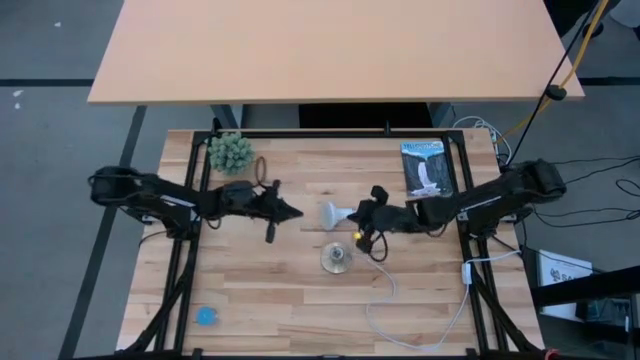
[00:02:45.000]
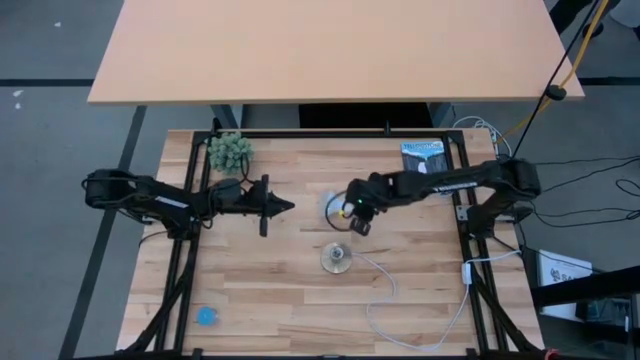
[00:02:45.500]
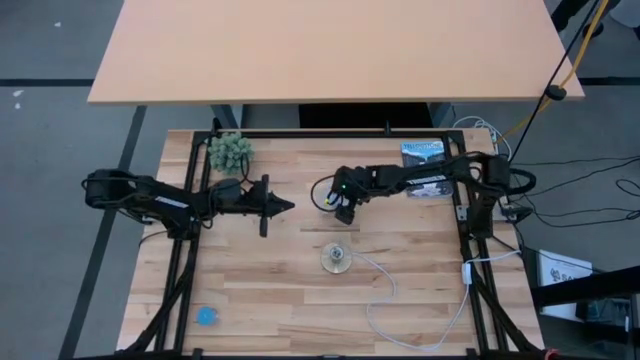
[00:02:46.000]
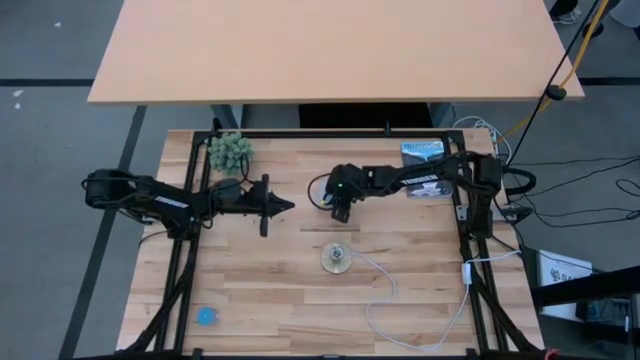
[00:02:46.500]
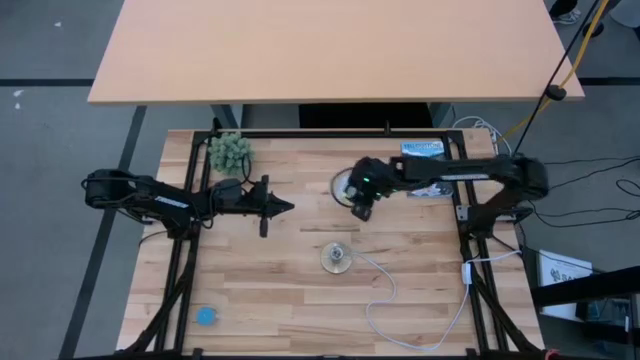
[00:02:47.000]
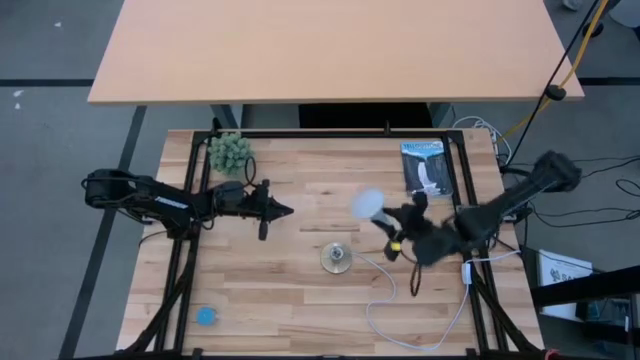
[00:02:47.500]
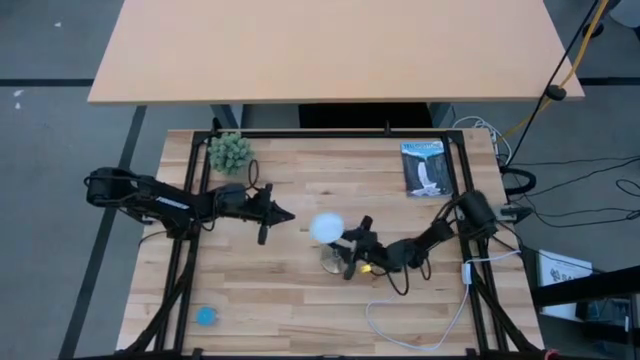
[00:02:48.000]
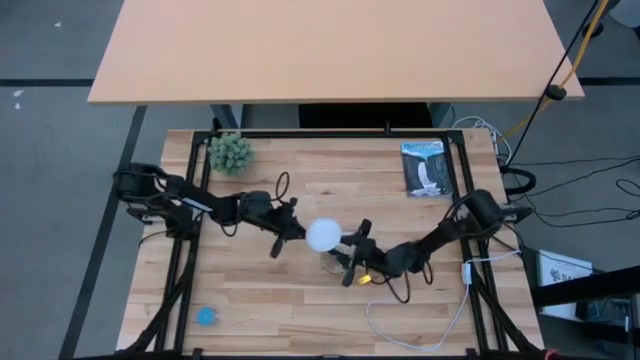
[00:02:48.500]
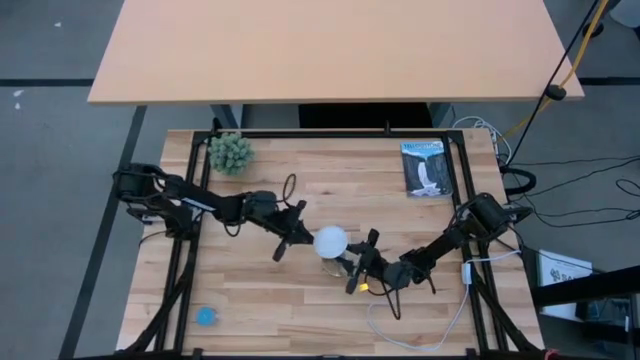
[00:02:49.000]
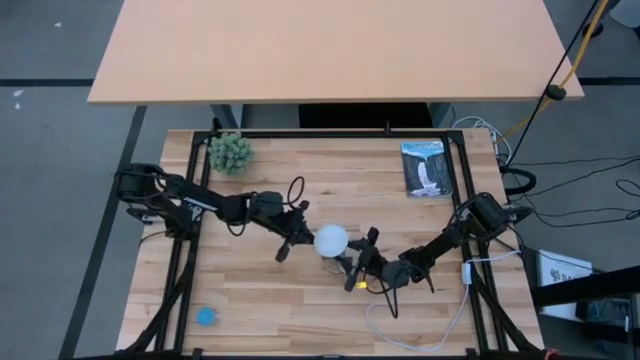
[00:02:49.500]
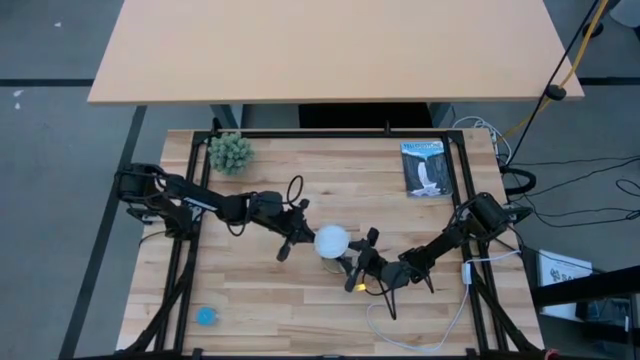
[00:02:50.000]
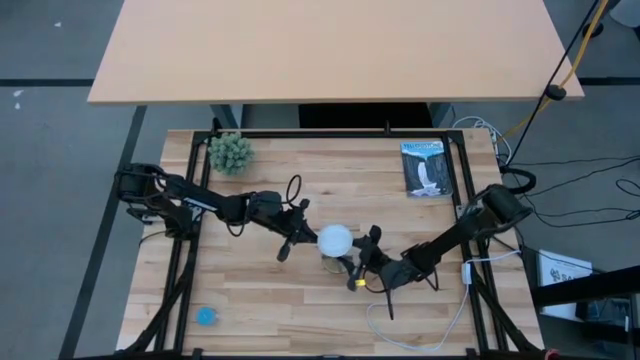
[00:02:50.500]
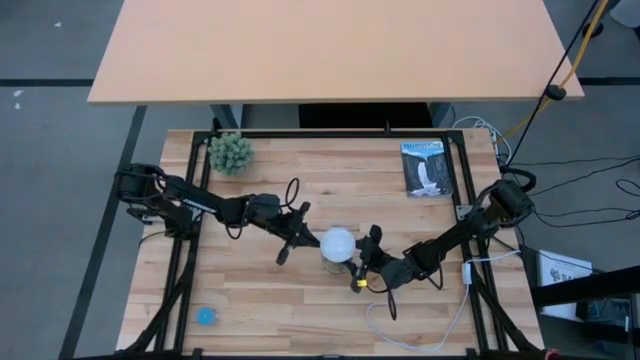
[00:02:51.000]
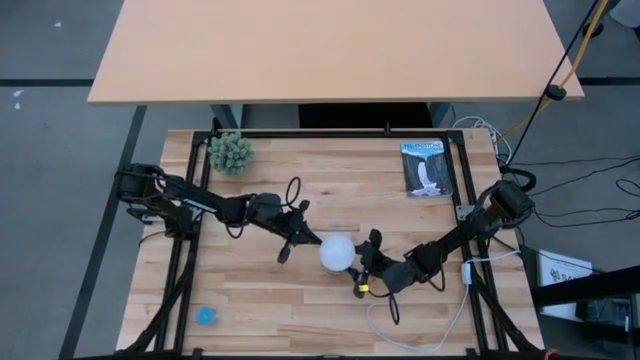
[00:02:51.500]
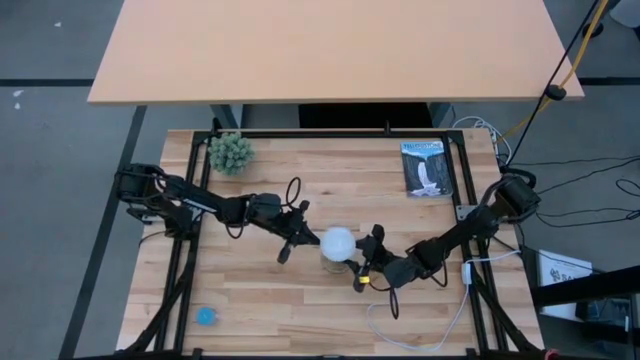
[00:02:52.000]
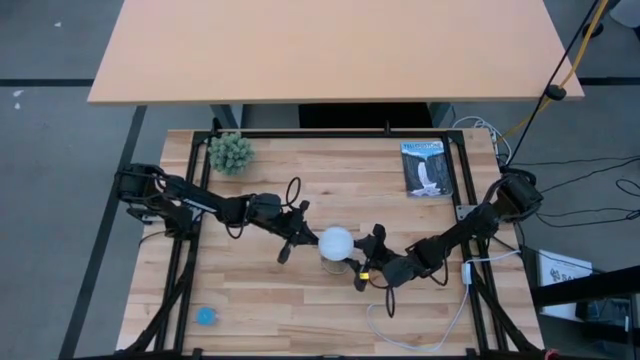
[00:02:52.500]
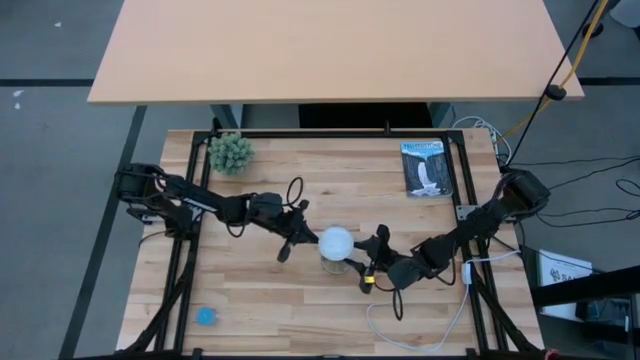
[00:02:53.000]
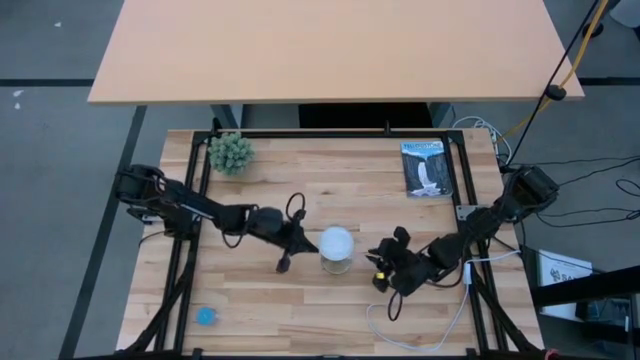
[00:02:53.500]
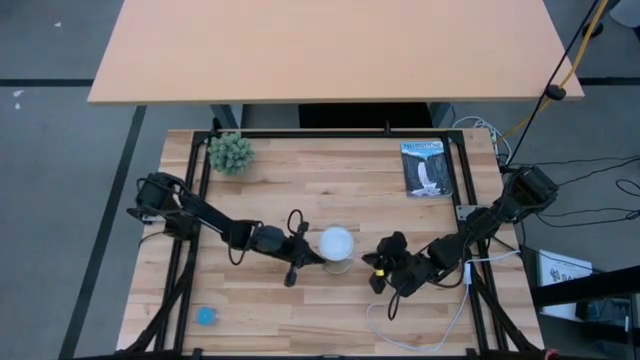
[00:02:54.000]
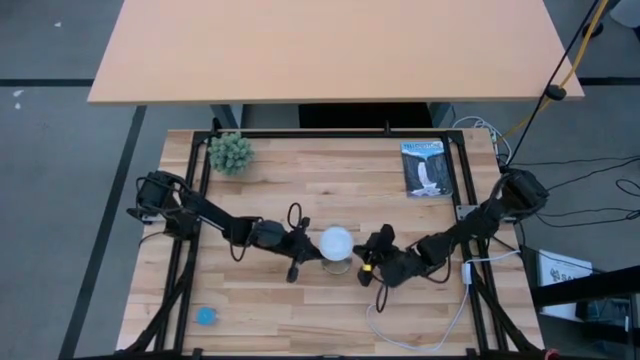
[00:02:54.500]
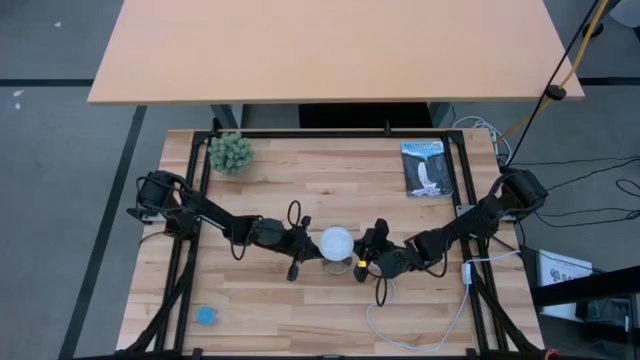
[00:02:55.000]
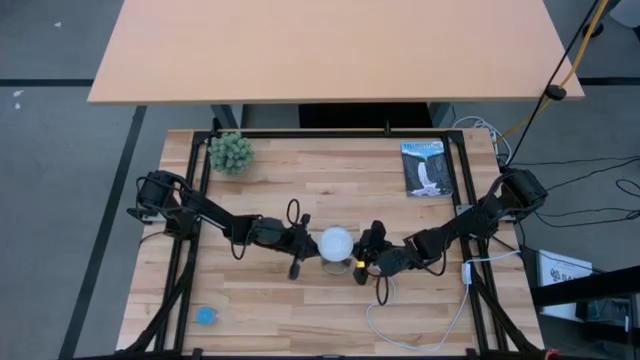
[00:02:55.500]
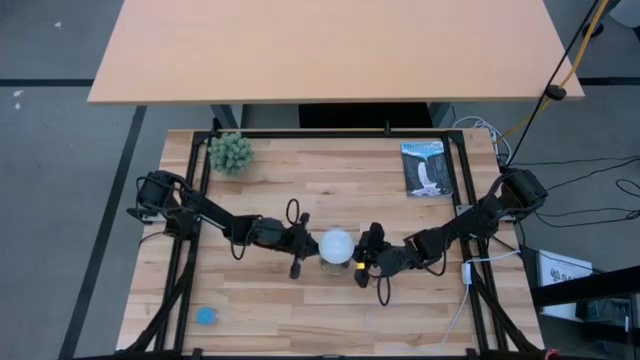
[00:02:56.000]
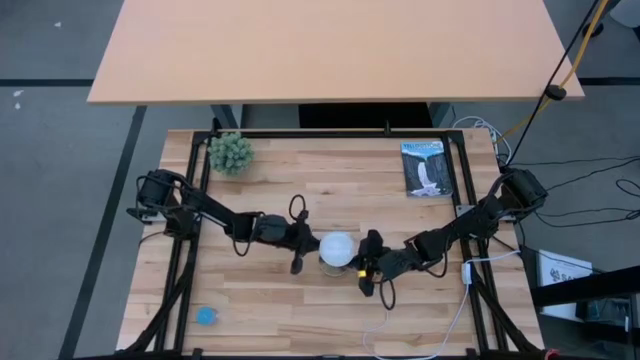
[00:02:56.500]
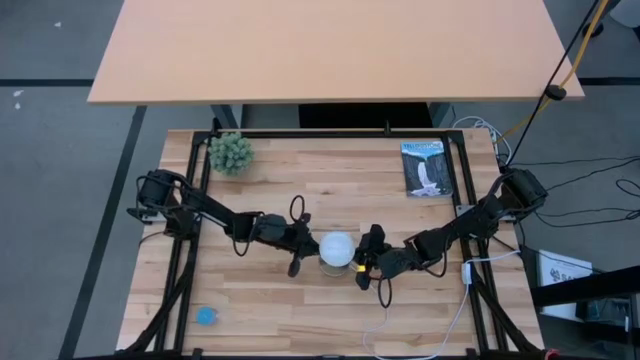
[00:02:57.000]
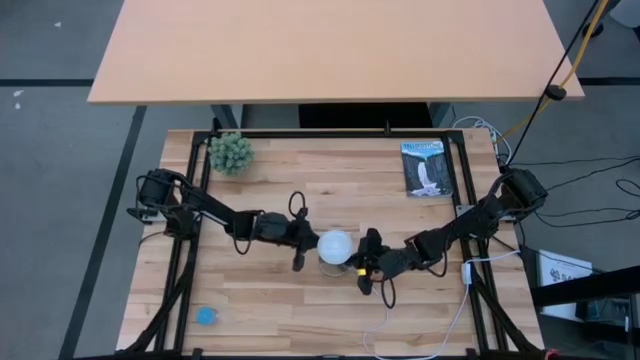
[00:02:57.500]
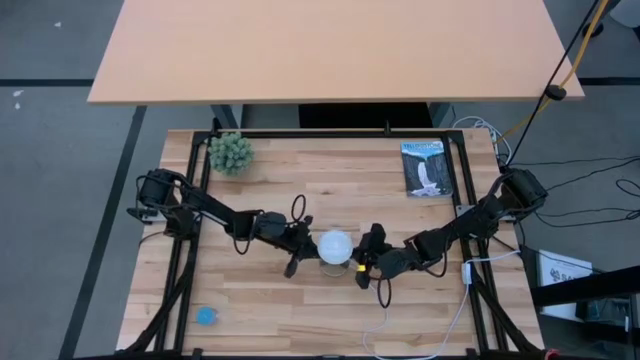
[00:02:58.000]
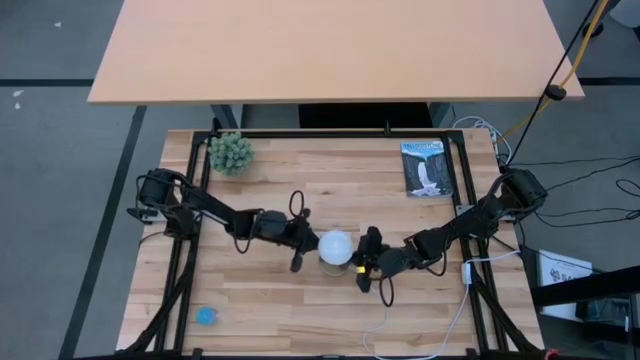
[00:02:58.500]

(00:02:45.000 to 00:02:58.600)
Task: Screw lightbulb
Insert the white light bulb into the gold lamp

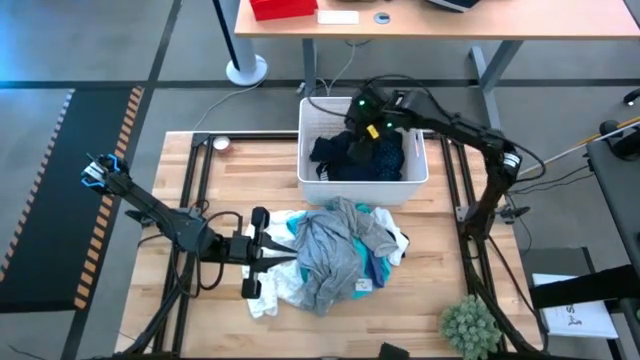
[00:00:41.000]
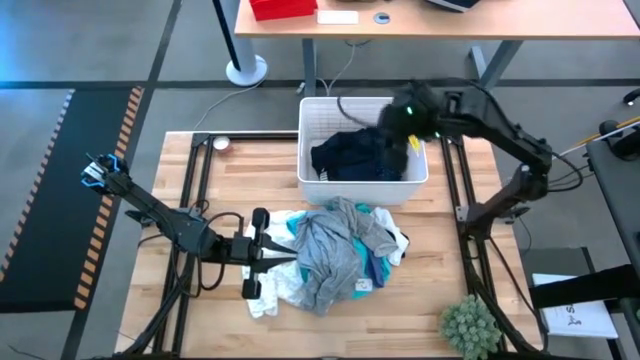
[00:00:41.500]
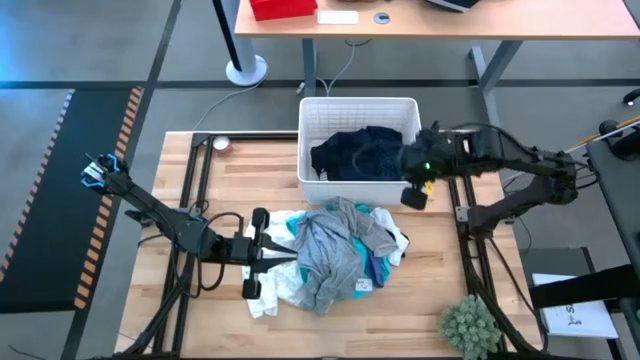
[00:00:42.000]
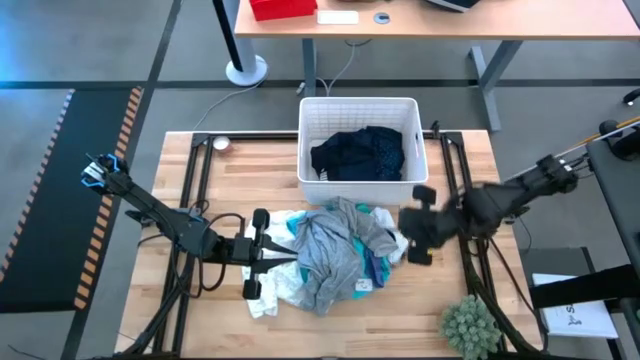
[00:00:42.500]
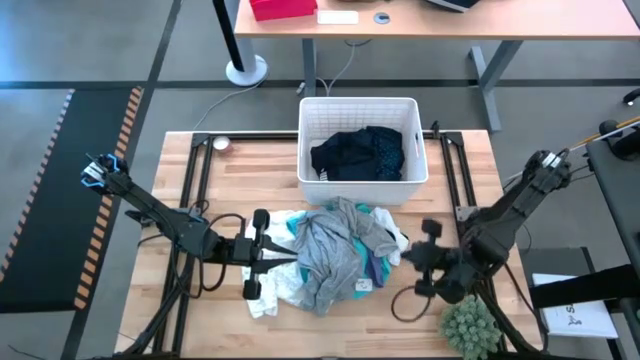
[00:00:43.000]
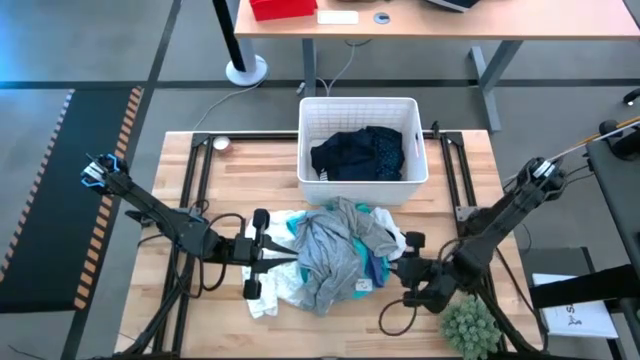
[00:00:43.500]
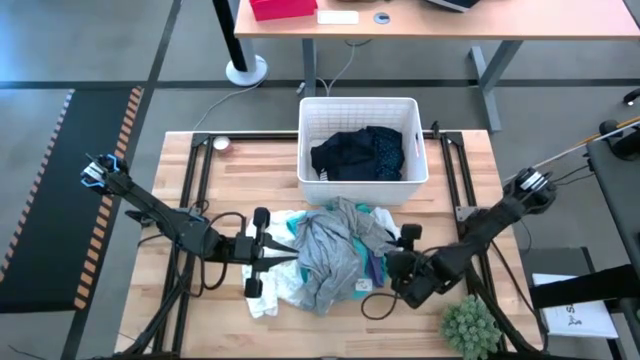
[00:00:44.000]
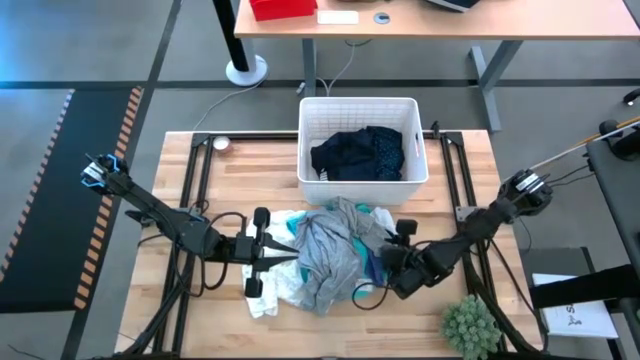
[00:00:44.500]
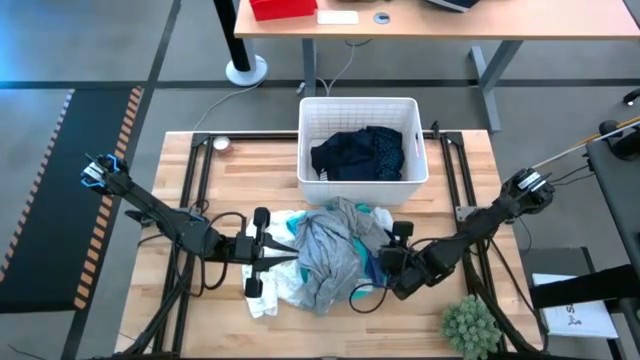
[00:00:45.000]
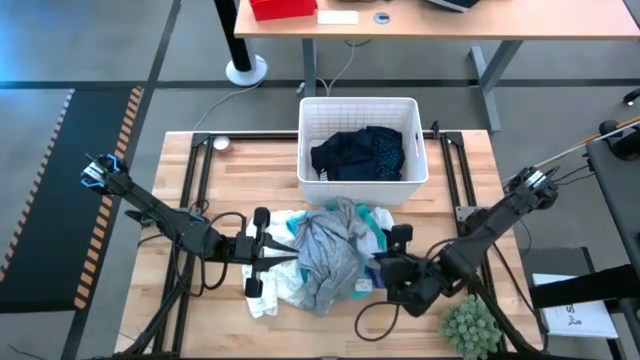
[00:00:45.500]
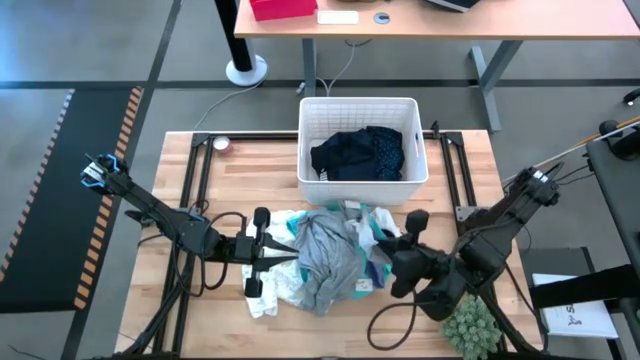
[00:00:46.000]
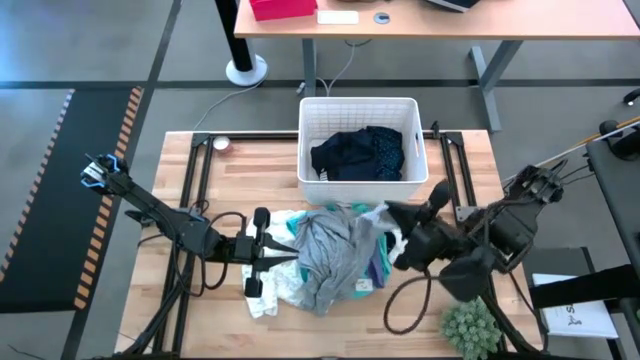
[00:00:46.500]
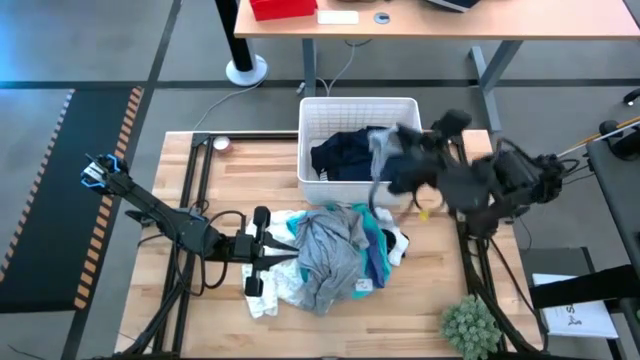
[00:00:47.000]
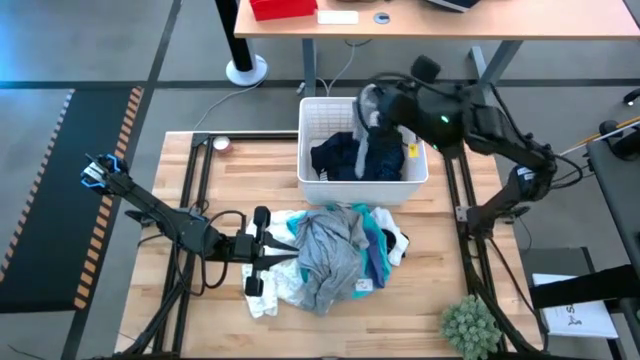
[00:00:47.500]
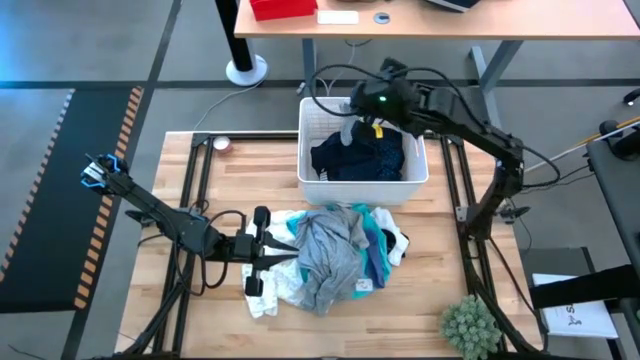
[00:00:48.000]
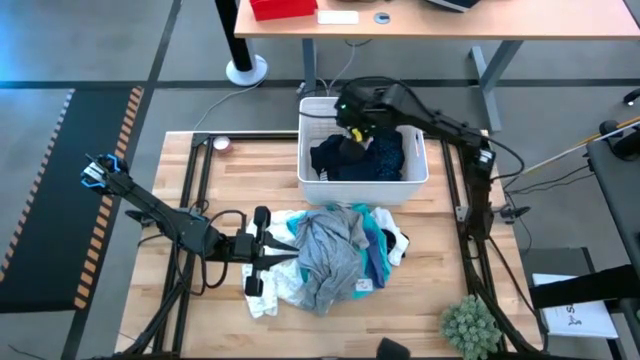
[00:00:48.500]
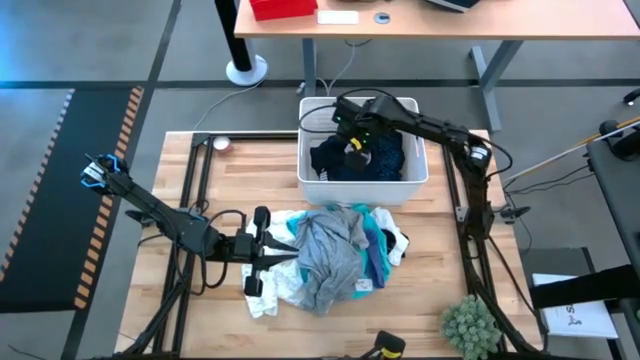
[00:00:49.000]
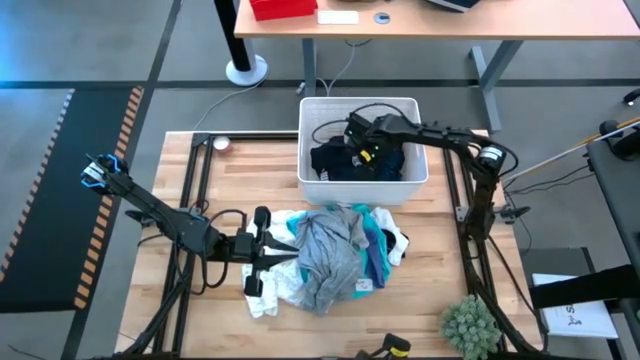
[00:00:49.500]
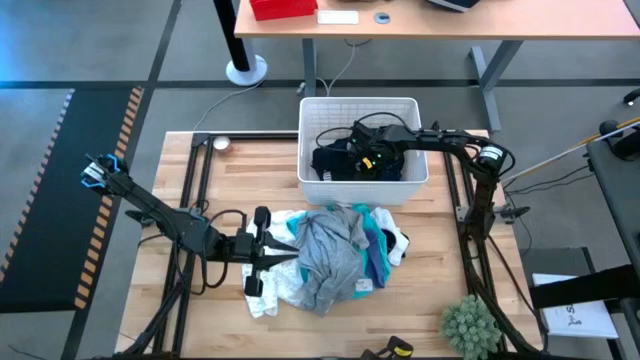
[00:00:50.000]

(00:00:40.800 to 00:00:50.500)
Task: Sort clothes
Put the gray sock into the white laundry bin
